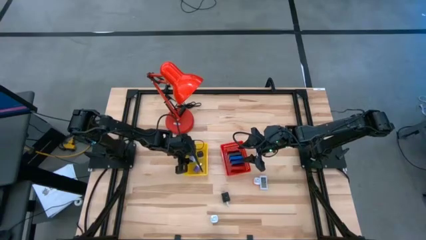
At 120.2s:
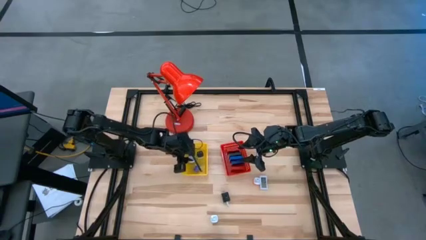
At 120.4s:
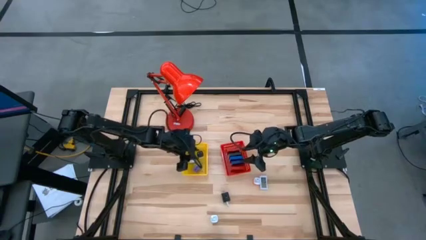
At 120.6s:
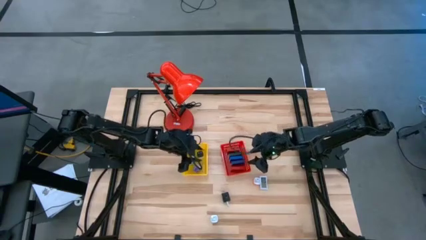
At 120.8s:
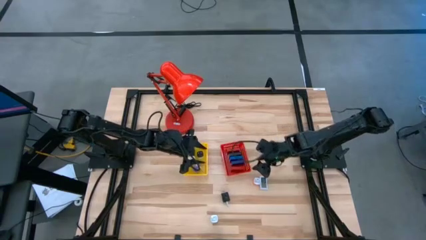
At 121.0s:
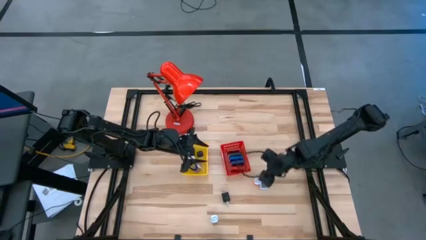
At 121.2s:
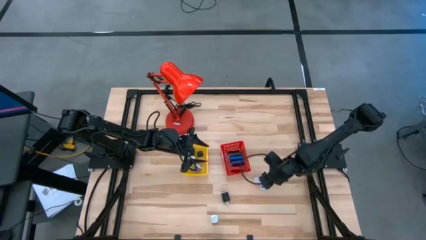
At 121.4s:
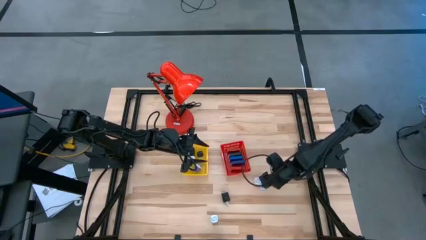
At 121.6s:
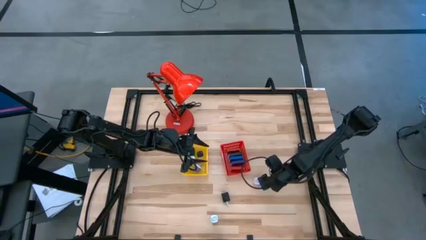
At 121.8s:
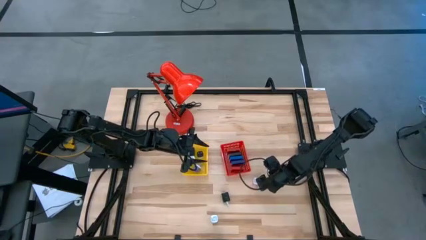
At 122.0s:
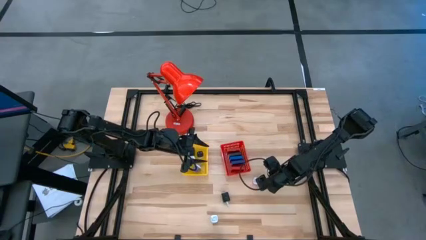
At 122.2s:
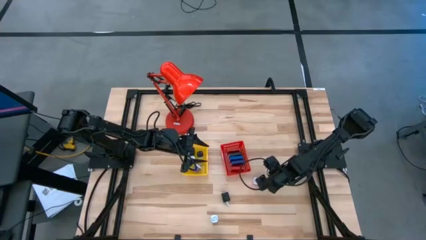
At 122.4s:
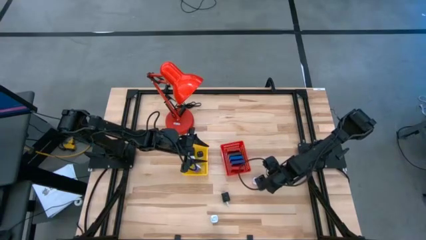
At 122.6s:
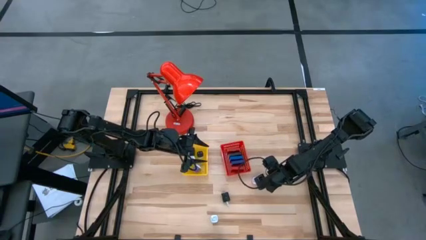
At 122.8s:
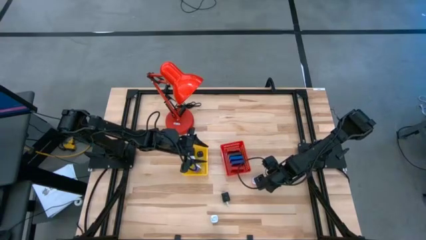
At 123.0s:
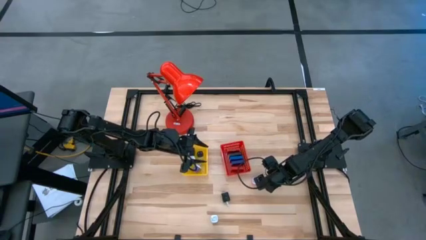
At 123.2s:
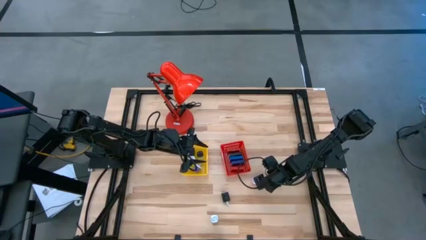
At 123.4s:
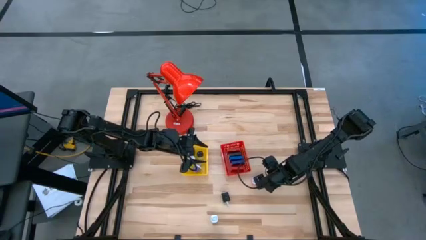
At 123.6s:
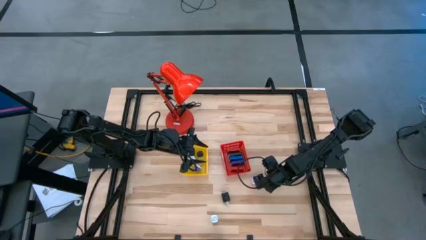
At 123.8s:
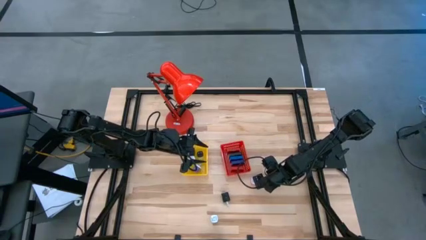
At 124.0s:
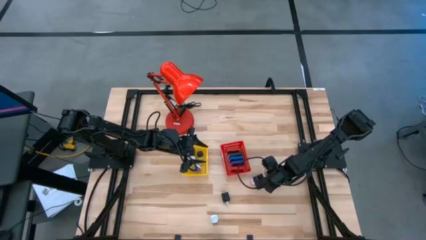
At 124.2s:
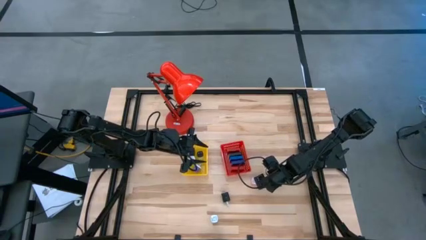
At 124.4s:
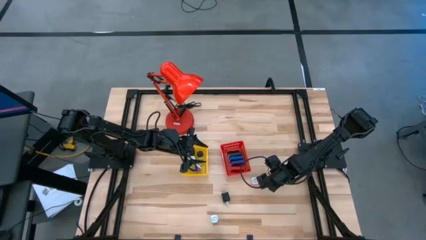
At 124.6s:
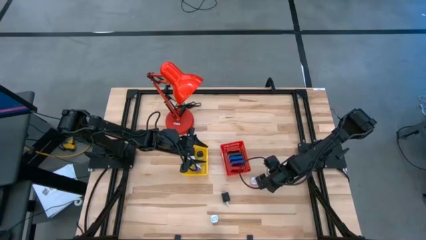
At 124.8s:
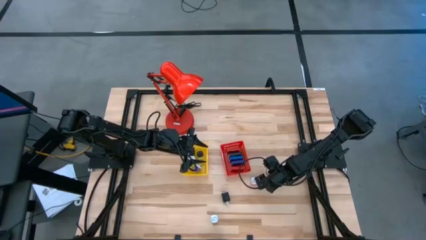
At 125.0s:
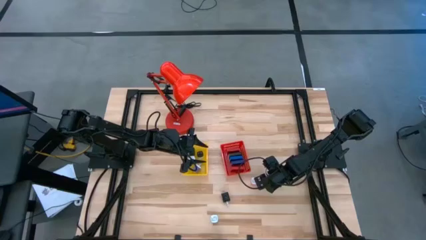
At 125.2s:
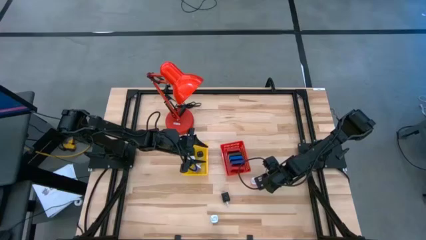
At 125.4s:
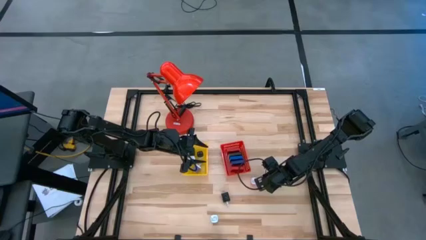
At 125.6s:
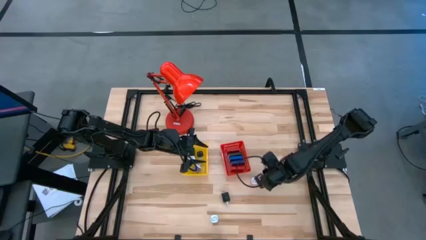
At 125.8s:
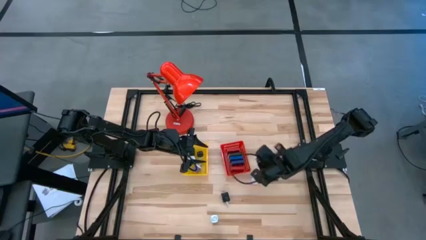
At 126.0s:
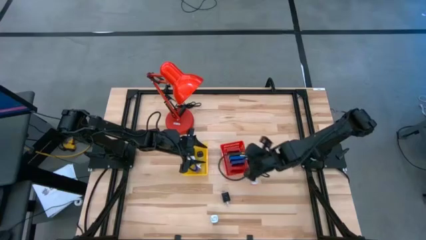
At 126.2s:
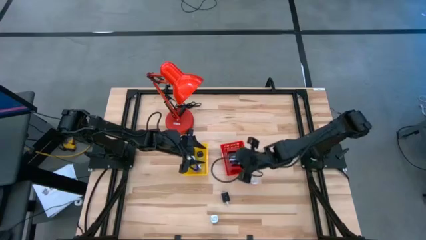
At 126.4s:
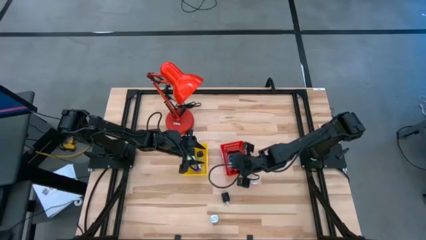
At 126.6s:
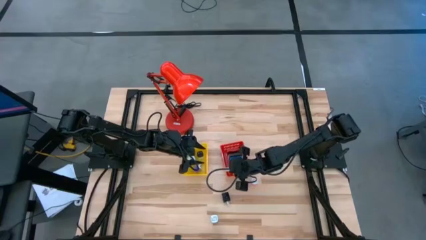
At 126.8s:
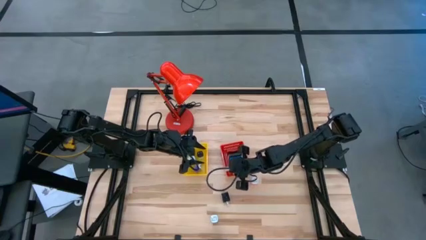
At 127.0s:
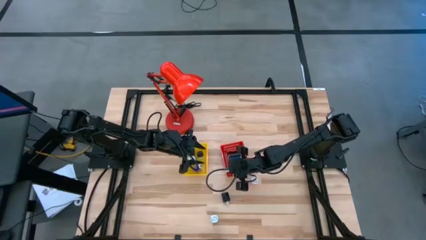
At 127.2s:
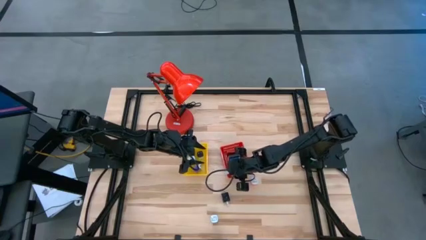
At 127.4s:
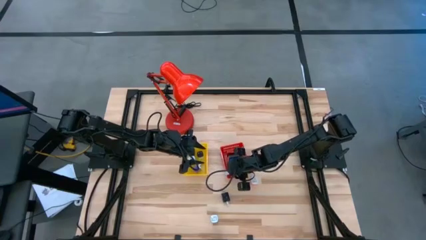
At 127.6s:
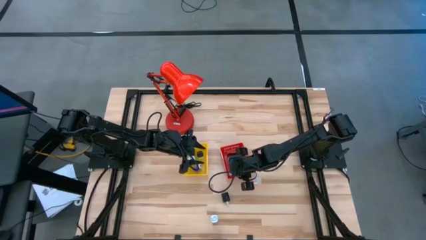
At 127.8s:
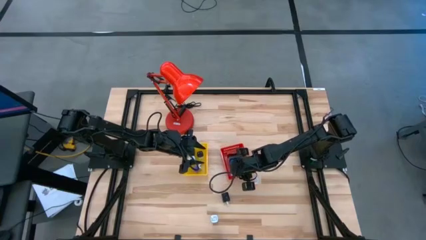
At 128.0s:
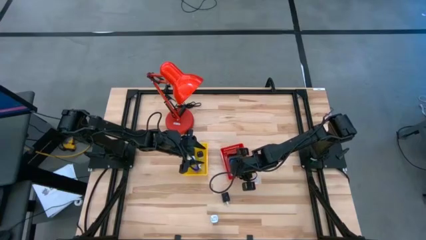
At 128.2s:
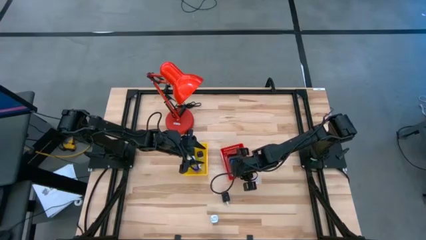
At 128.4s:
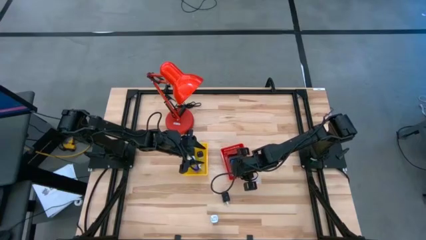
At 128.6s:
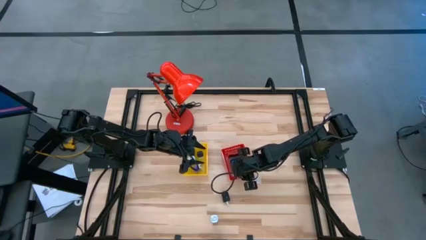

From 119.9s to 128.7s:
Task: Pick & Place Office items
Put the white digital timer into the red bin

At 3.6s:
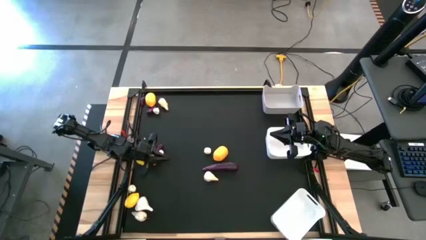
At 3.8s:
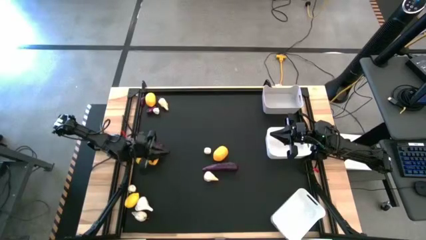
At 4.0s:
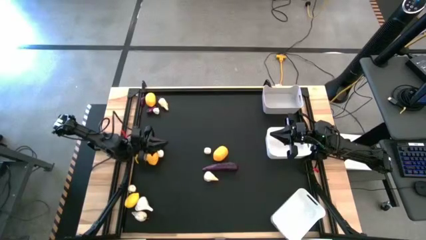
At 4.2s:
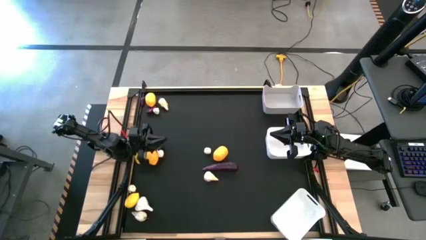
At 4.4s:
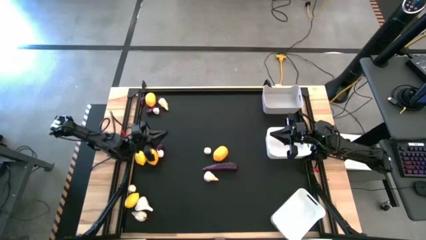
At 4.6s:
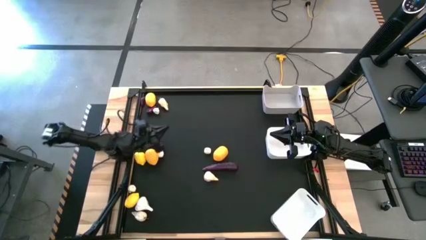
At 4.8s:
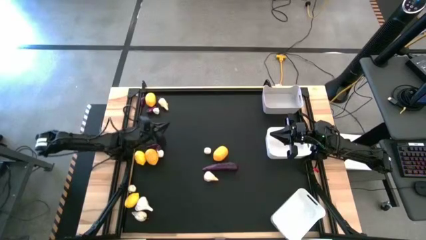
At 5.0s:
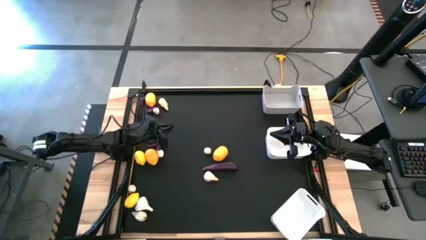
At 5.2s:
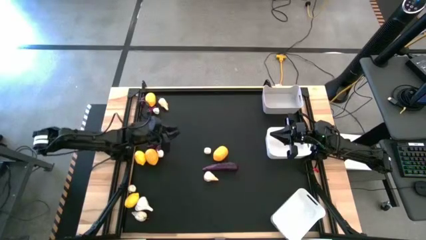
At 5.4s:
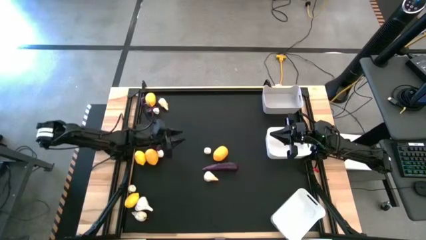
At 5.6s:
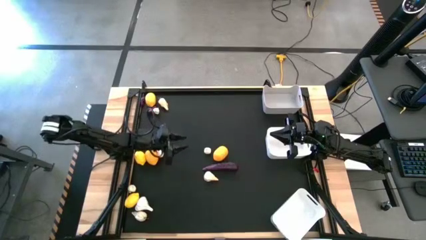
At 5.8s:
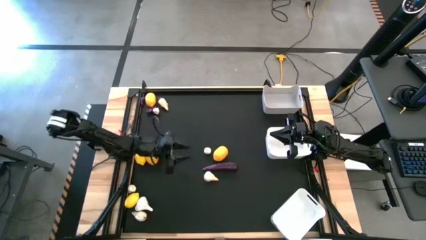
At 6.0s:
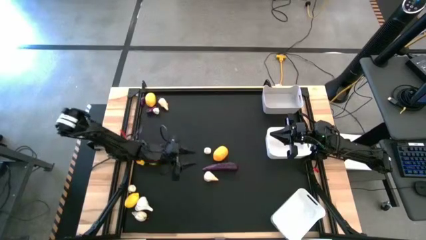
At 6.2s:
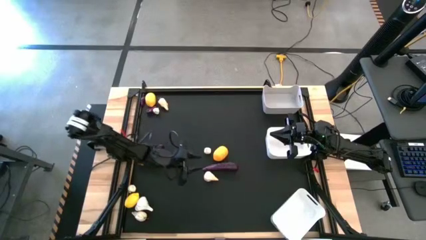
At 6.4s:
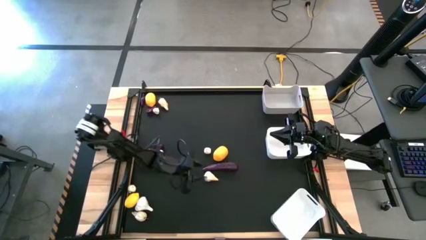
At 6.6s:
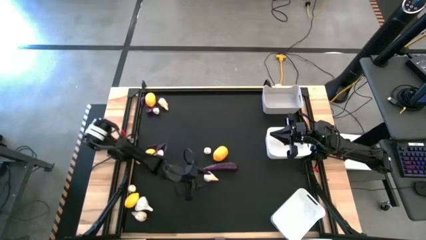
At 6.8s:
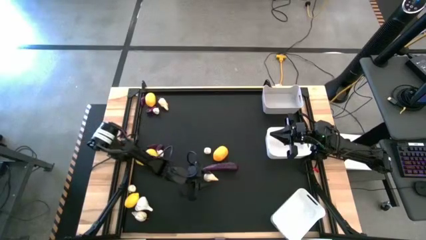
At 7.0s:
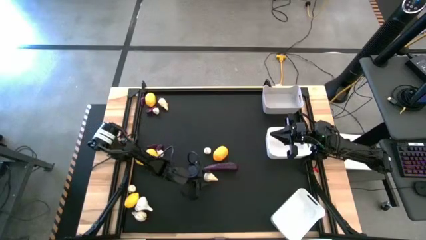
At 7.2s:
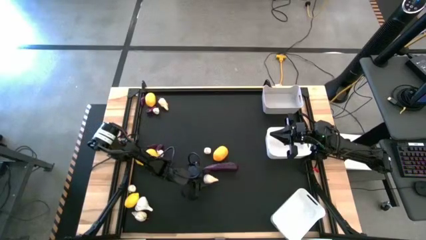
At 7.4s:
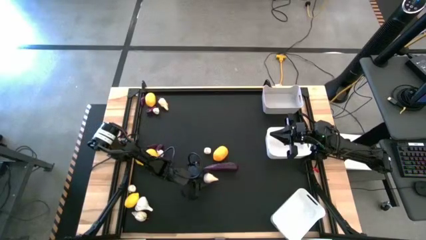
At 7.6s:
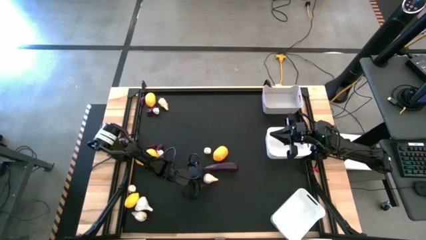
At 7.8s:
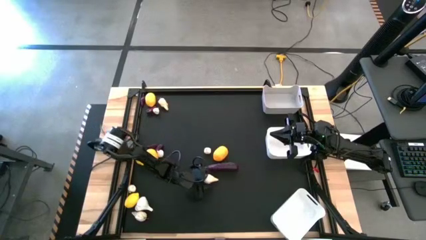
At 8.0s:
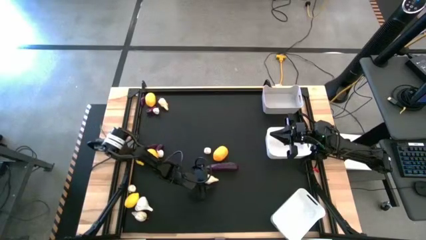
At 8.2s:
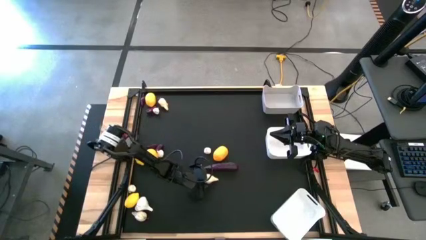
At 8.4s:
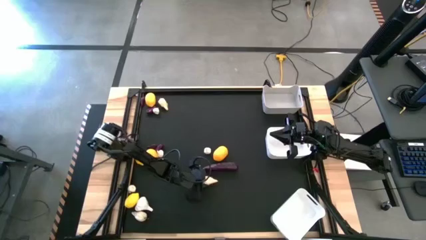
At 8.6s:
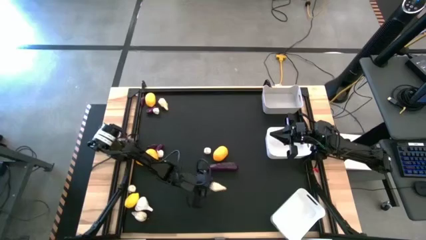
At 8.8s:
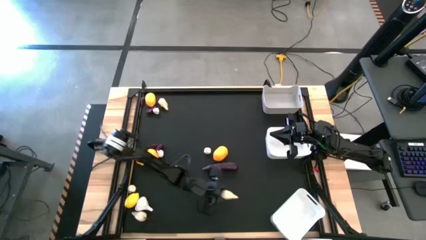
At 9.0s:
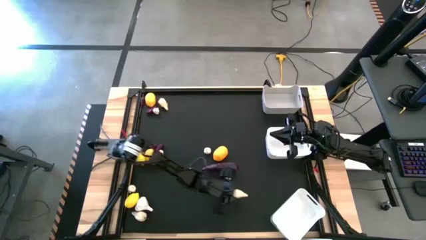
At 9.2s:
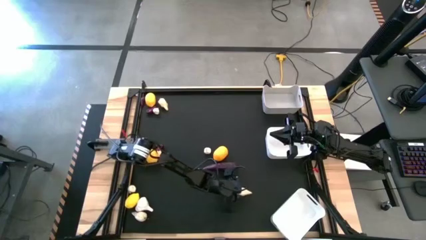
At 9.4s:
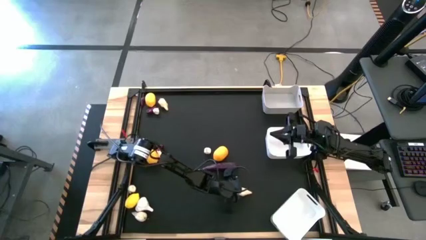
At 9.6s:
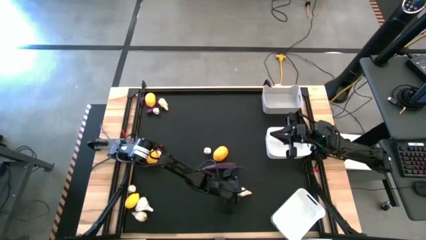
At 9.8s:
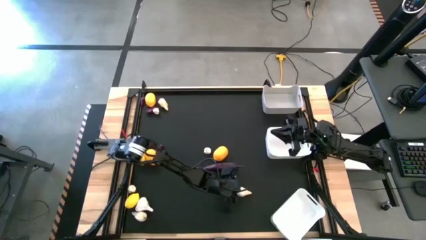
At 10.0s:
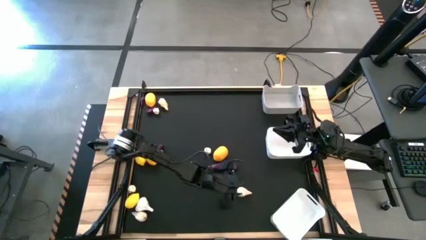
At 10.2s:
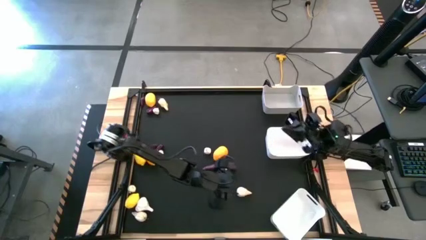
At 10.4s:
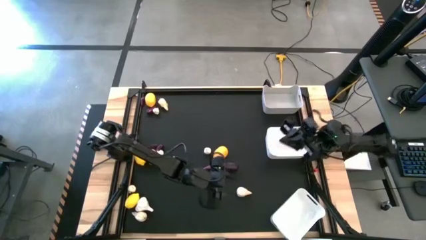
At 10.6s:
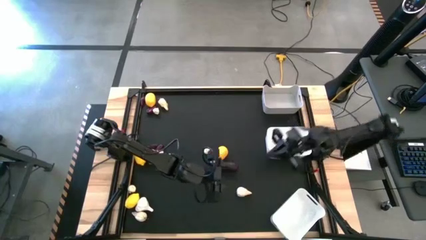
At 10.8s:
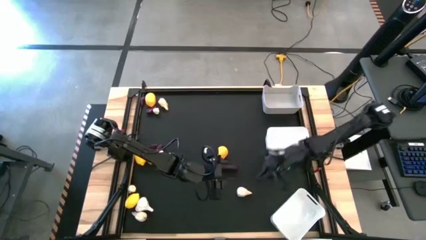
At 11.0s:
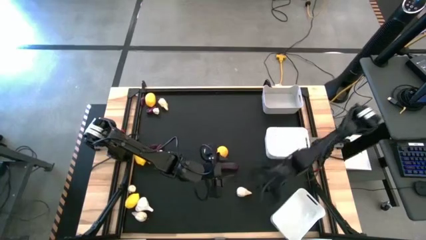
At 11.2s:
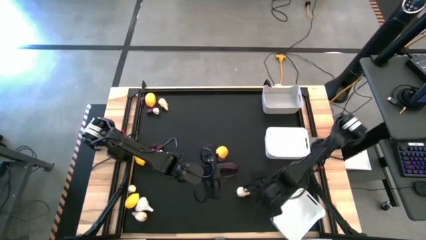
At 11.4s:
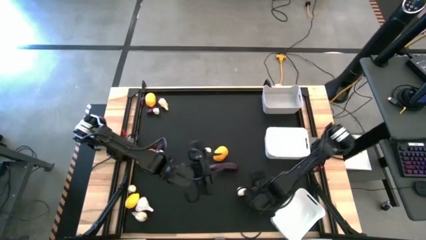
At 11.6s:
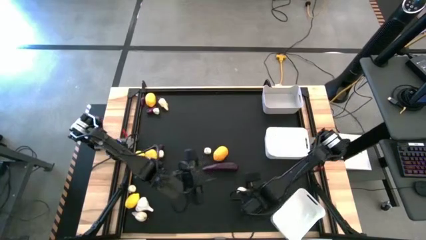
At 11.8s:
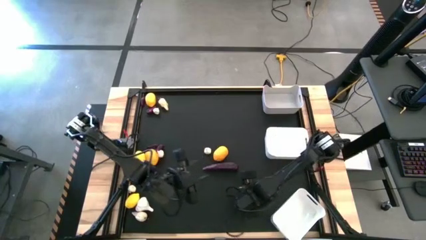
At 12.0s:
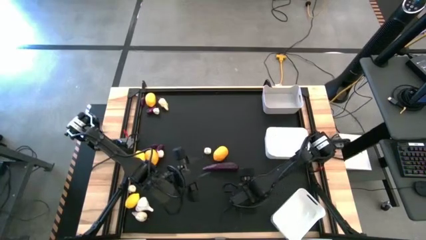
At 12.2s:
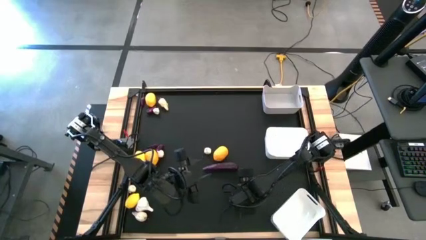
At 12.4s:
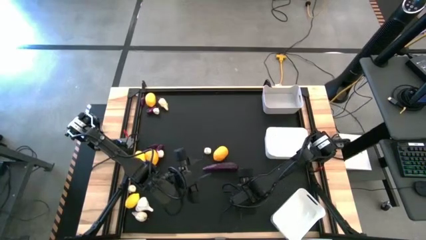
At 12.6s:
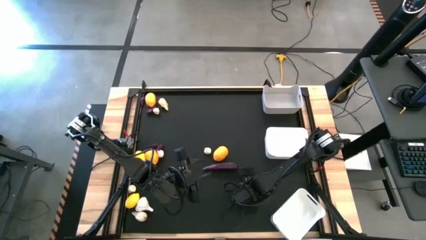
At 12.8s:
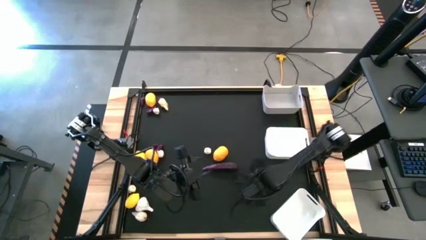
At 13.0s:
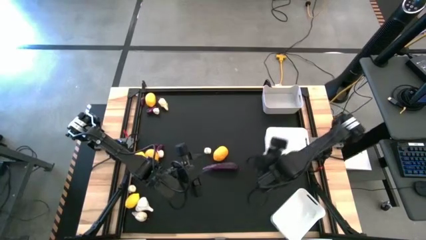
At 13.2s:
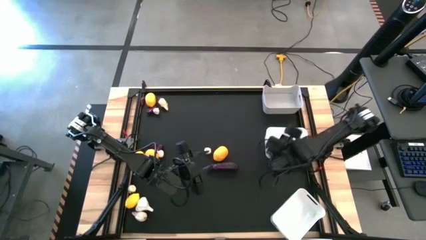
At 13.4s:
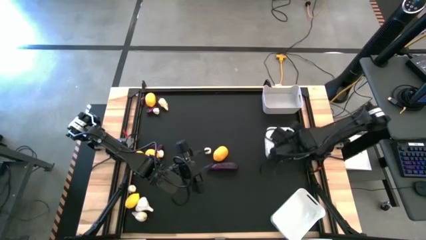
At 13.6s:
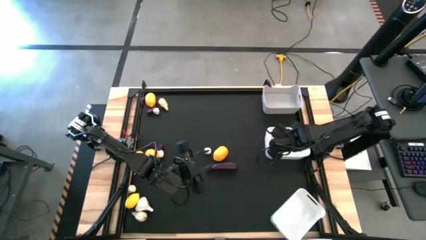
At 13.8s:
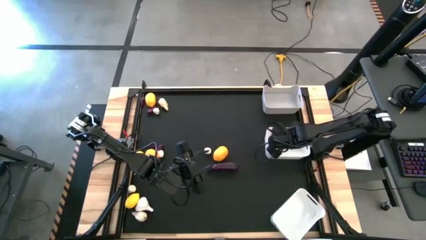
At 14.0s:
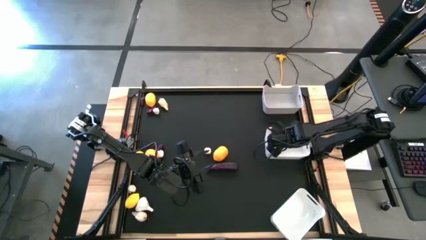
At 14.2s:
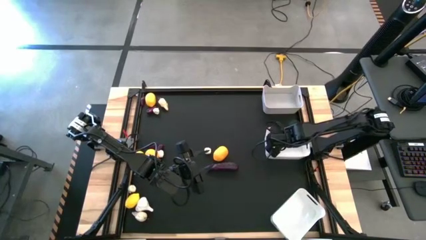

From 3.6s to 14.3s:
Task: Sort produce into baskets
Put the garlic into the top white bin
